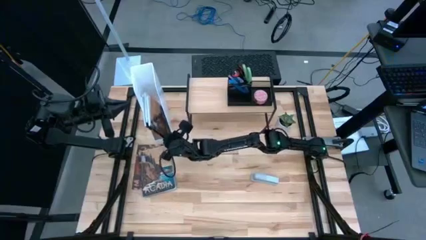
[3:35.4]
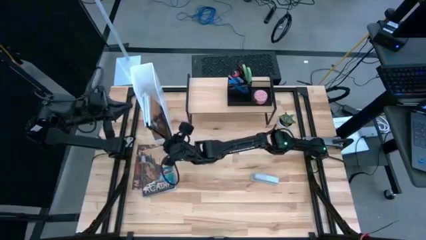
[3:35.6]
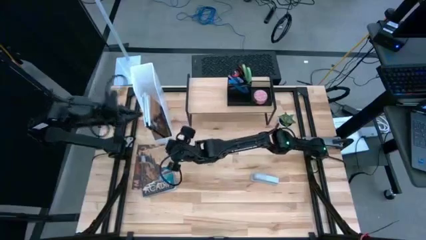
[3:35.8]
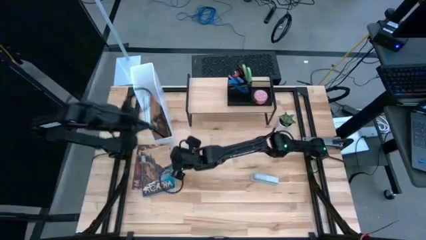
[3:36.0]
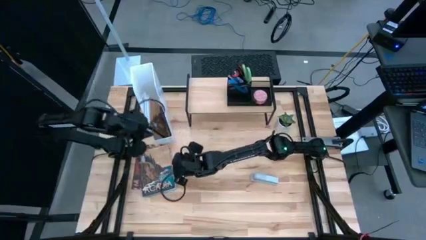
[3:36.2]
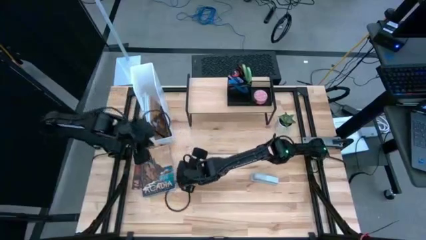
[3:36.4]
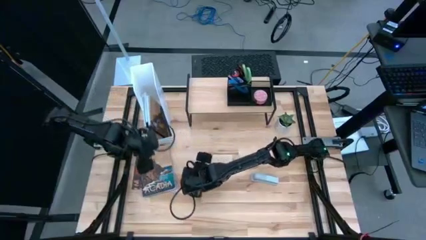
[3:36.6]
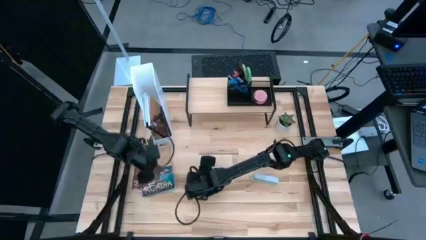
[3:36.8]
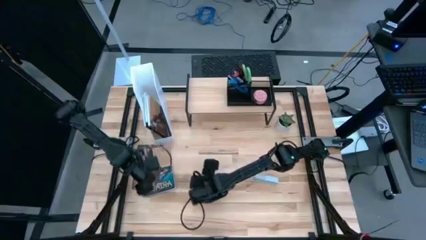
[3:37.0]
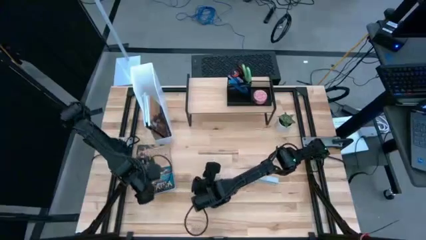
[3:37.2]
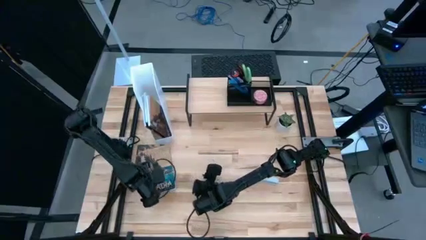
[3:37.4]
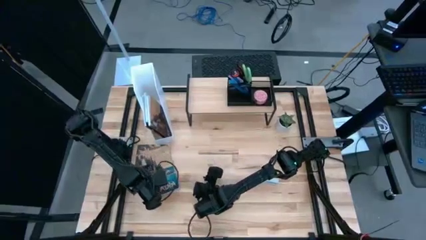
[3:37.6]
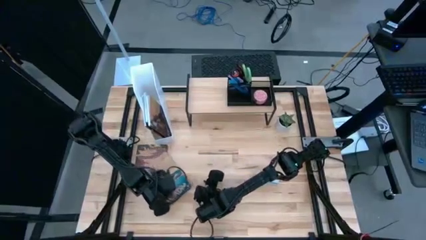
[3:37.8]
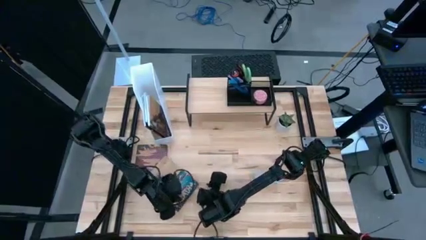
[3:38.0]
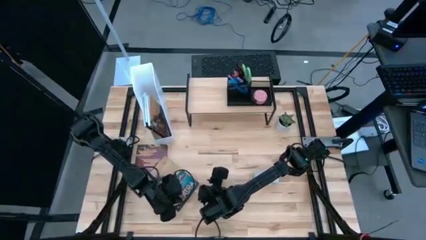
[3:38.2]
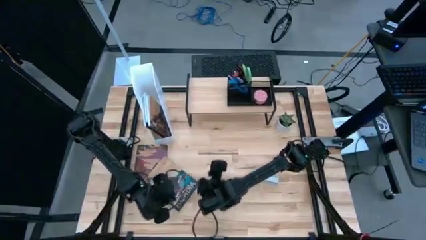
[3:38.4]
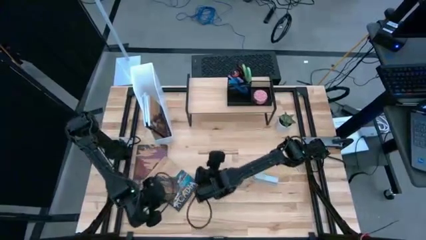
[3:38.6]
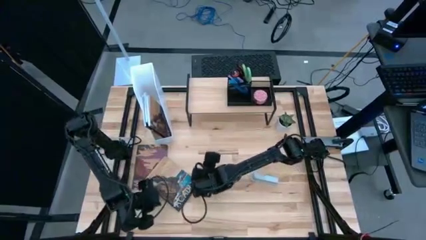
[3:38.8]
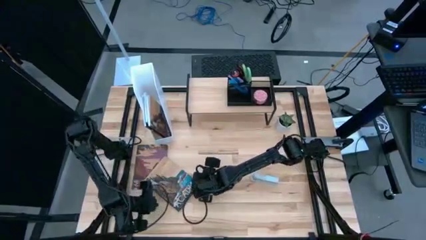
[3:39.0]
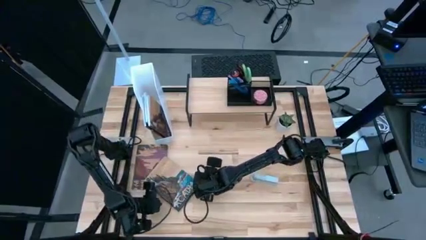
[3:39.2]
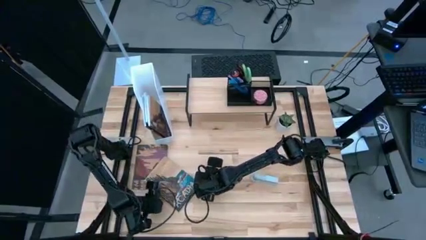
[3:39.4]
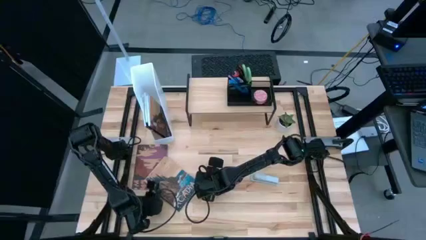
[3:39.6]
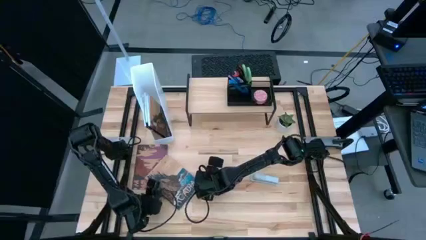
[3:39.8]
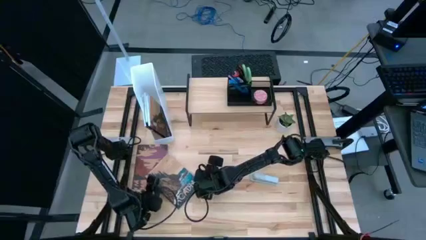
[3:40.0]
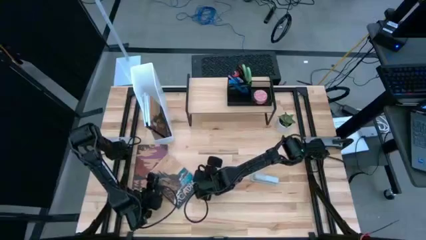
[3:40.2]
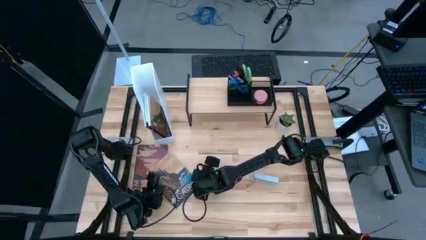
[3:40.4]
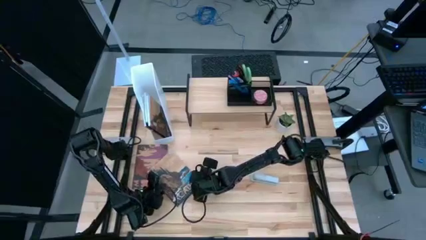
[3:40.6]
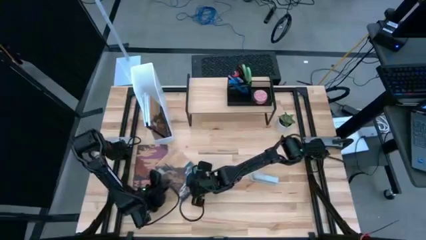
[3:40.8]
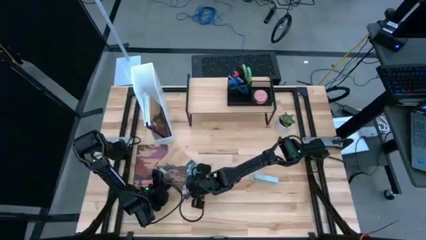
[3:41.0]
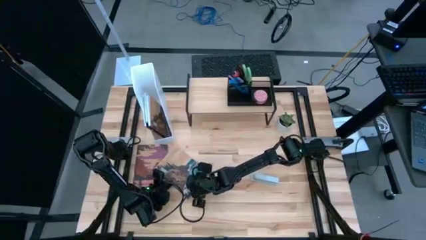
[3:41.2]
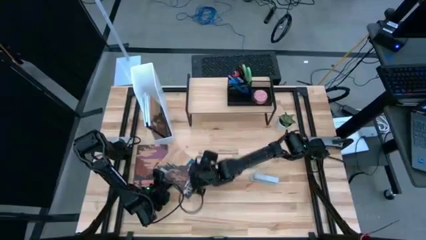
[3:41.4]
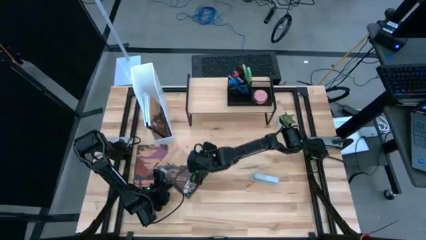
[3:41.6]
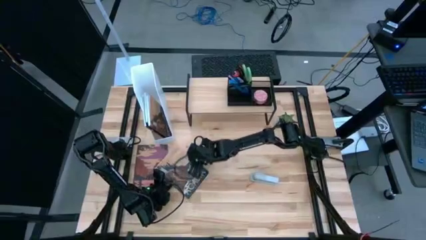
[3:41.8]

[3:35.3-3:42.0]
Task: Stock shelves
Put the brown book into the white bookshelf

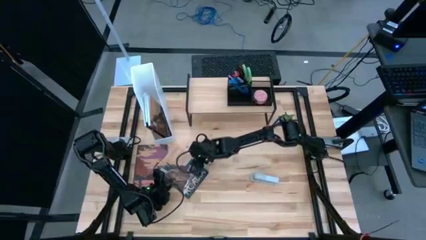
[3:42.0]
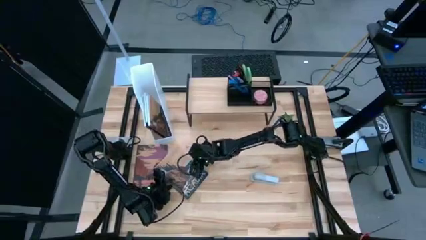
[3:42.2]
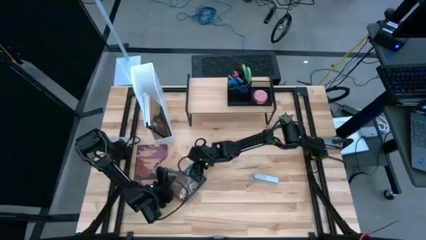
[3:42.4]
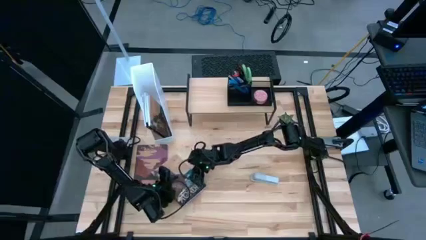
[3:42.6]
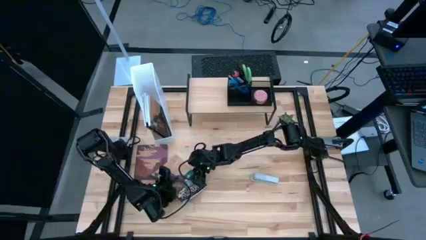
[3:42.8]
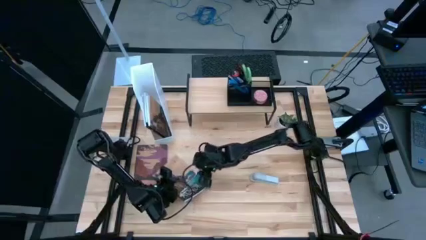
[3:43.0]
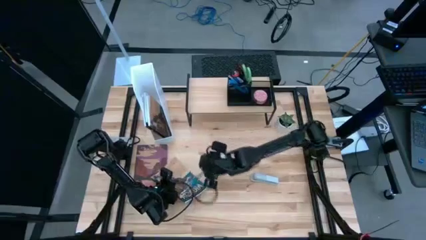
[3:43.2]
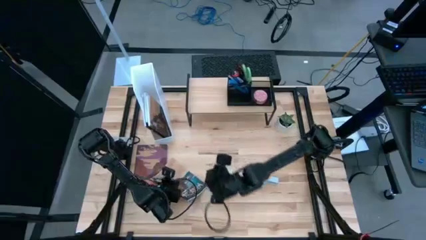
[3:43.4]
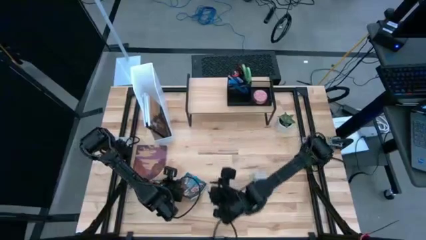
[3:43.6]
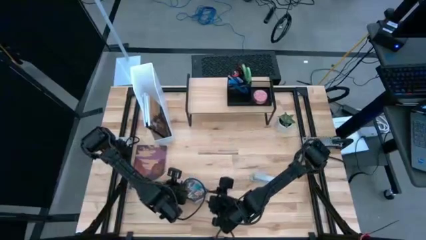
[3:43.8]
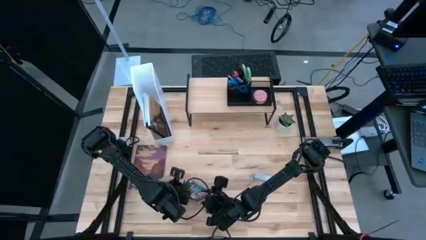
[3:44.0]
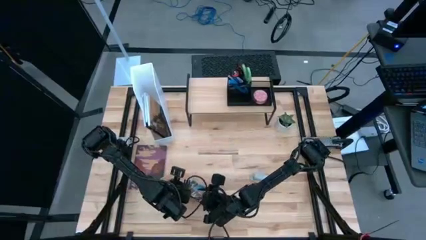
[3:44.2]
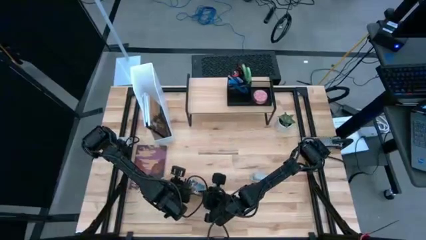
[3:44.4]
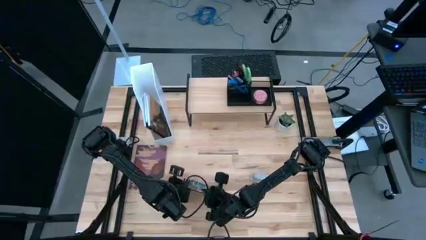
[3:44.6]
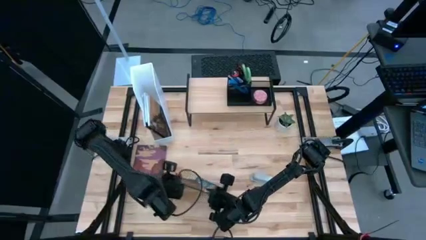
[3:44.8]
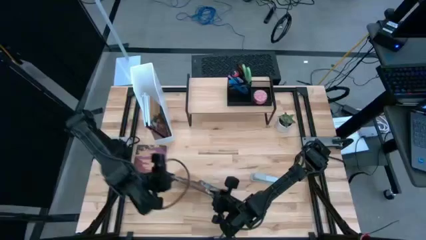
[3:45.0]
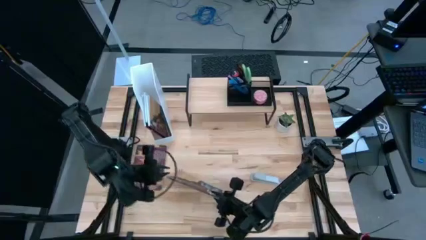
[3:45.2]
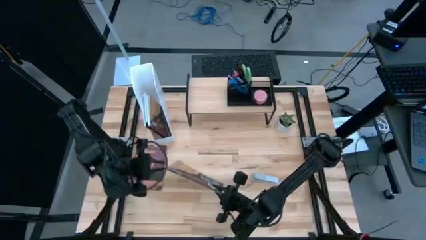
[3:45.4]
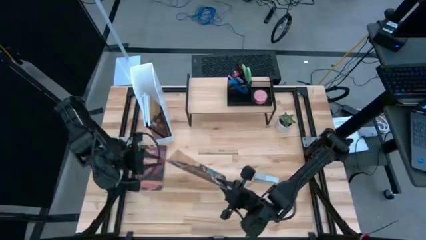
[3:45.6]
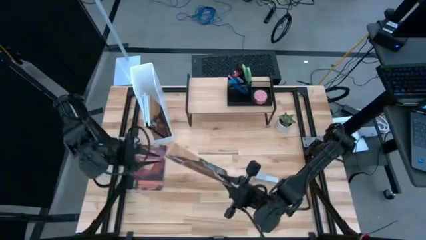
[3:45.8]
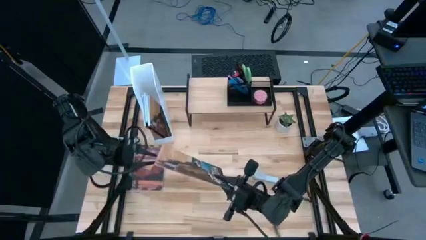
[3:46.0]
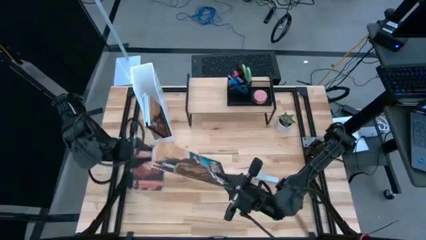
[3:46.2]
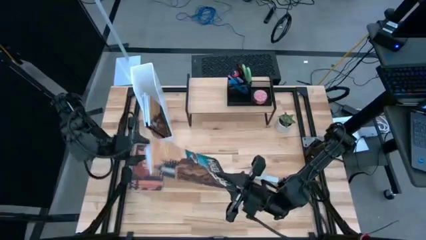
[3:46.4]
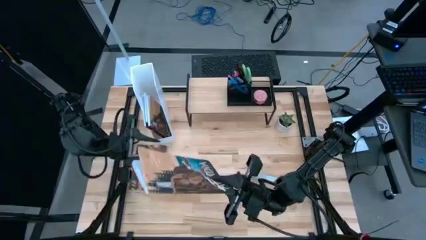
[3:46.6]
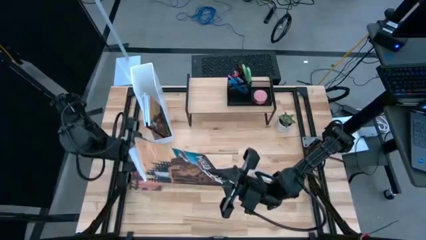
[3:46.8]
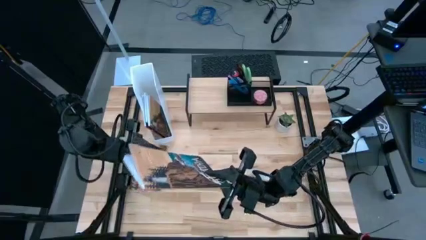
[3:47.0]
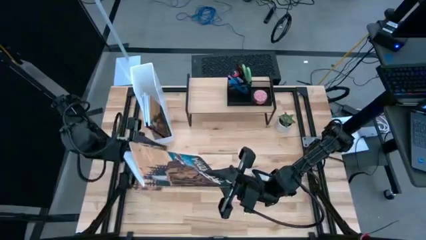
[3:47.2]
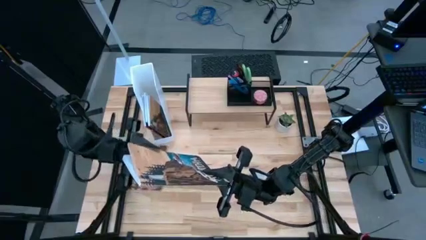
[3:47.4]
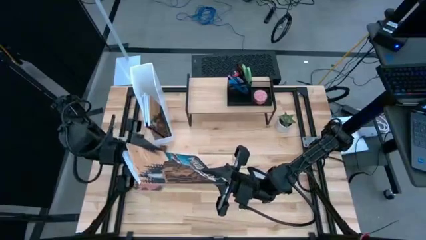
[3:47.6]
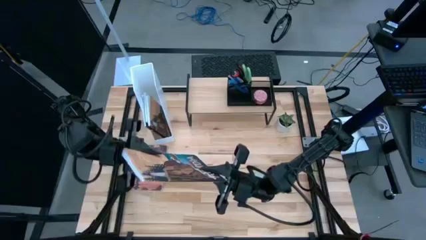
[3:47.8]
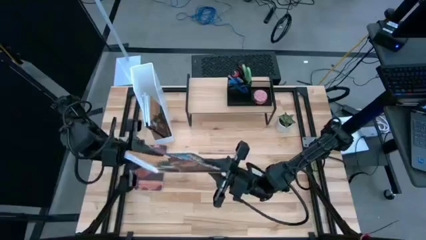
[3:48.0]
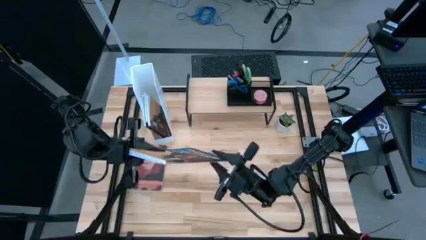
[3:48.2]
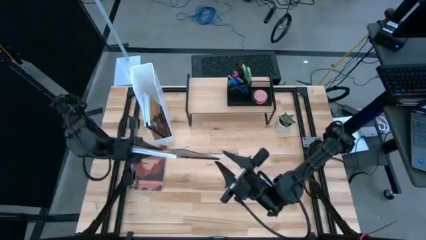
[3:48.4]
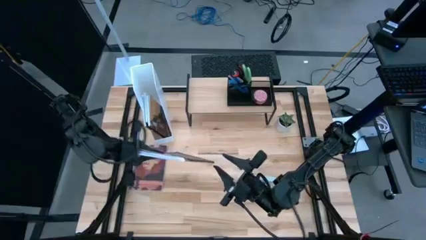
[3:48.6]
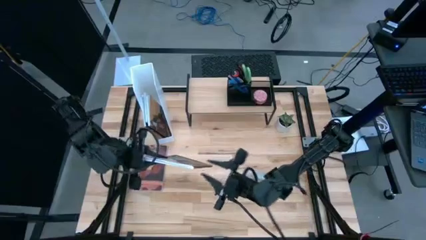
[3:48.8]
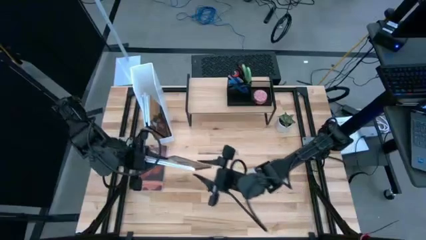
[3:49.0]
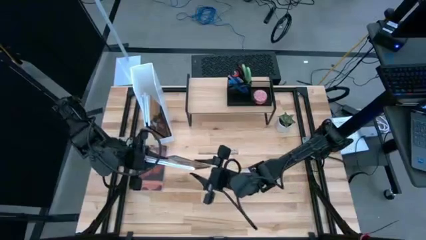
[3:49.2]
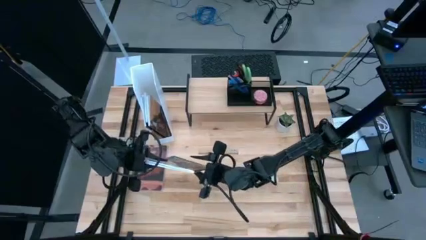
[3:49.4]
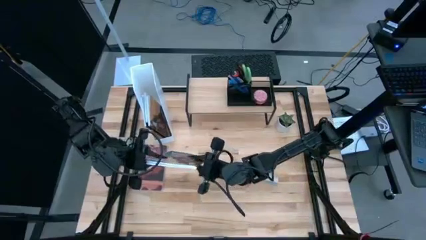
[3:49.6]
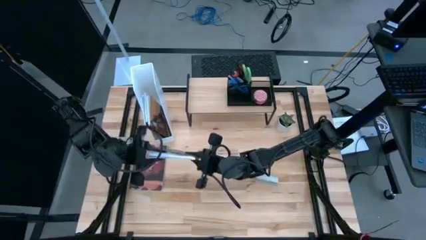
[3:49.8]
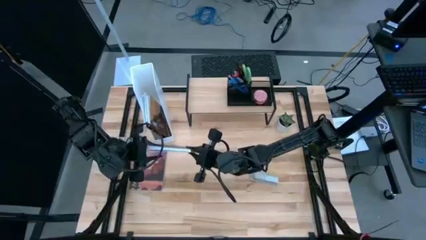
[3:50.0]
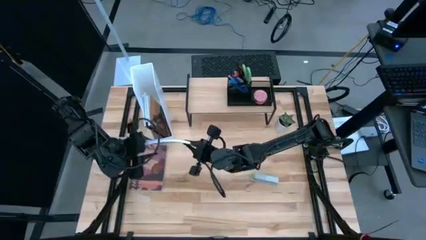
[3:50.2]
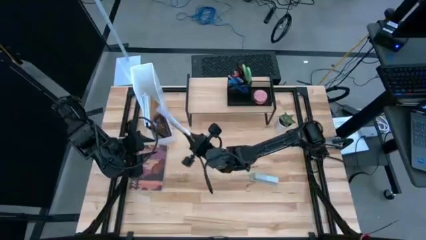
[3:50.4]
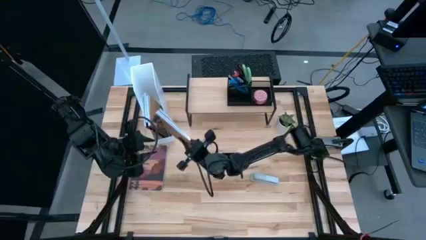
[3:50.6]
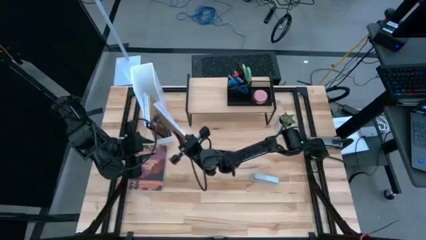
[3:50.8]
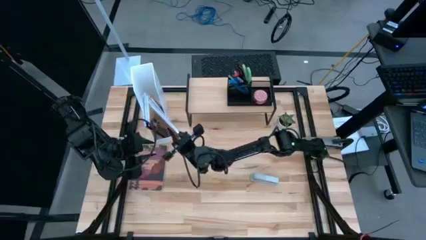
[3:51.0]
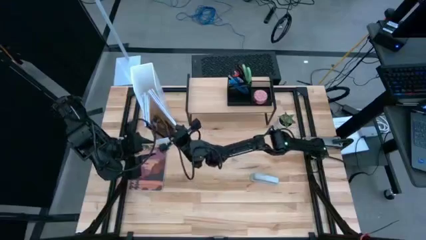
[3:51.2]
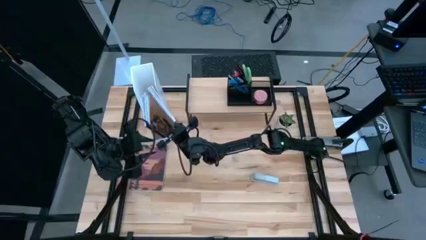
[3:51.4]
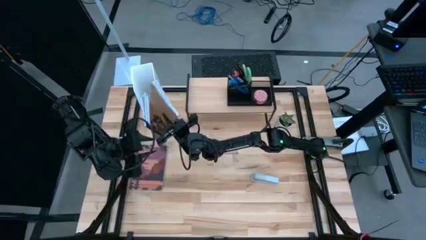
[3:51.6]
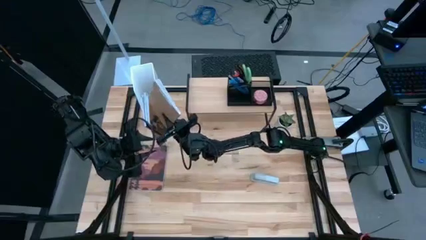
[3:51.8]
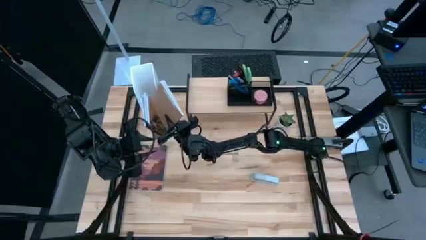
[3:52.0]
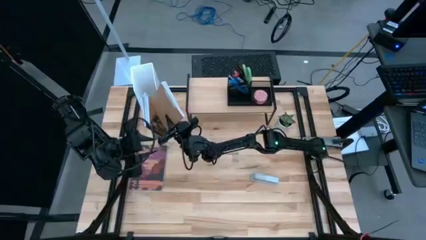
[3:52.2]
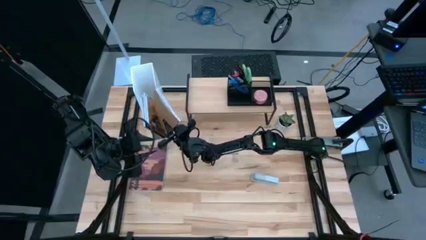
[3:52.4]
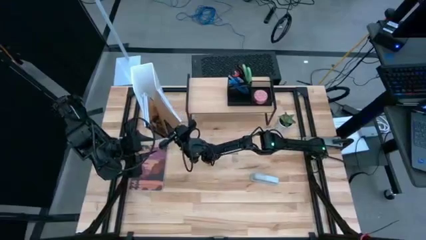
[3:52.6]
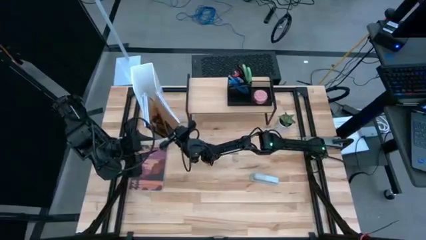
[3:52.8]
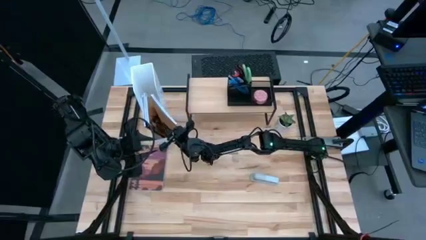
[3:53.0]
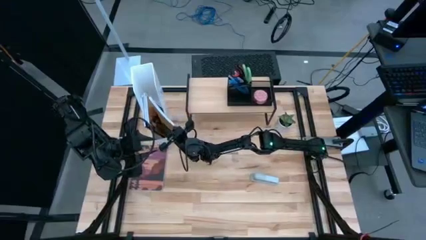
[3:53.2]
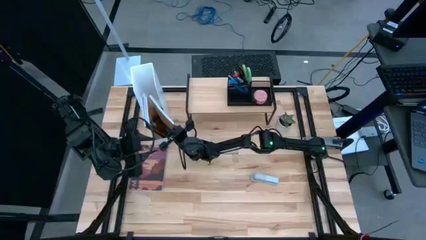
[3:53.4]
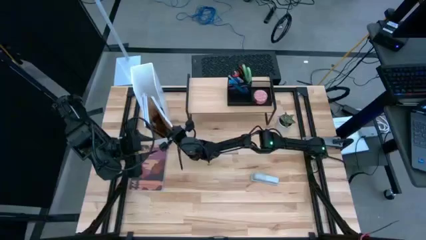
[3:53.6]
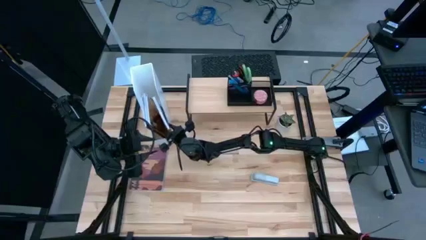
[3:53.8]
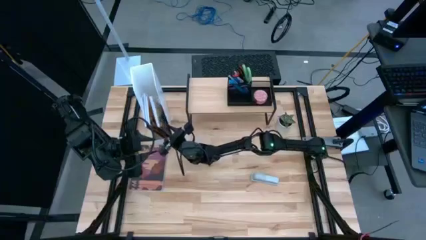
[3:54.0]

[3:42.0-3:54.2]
Put the brown book into the white bookshelf
